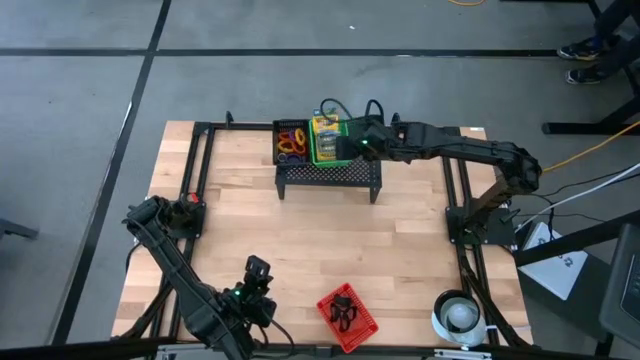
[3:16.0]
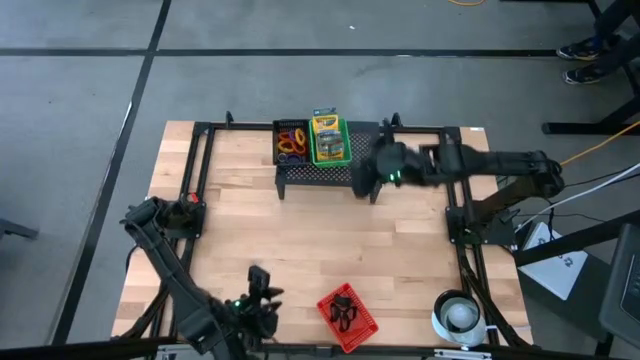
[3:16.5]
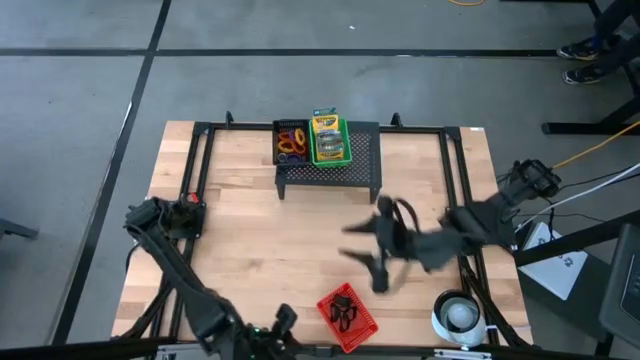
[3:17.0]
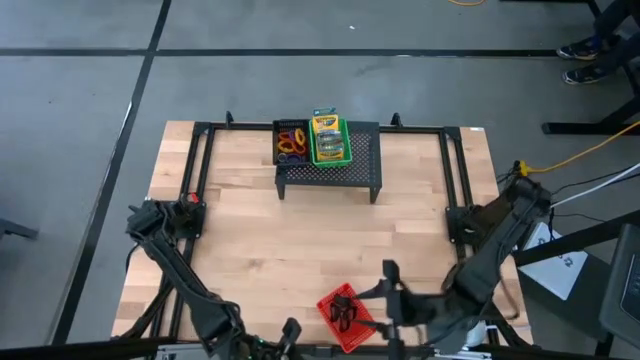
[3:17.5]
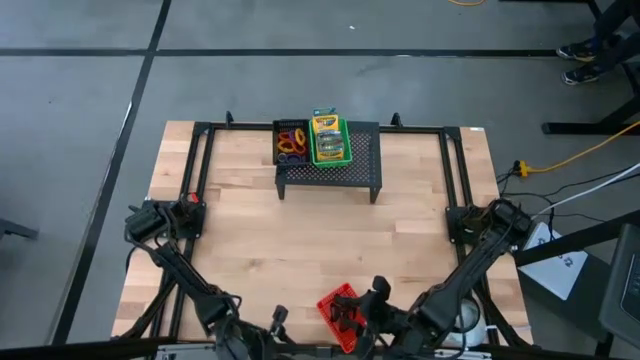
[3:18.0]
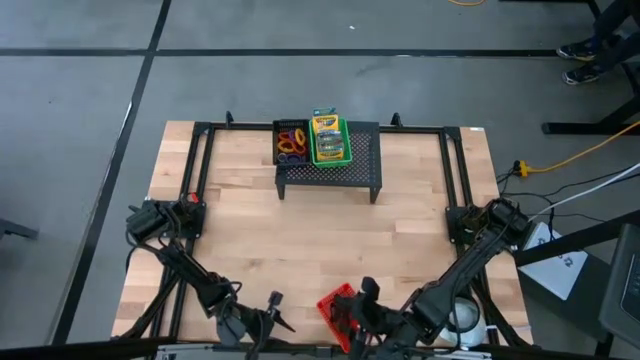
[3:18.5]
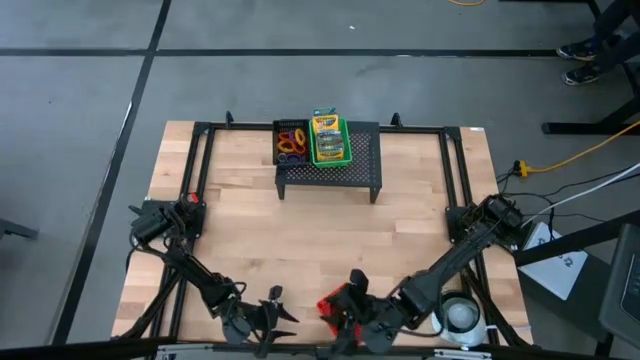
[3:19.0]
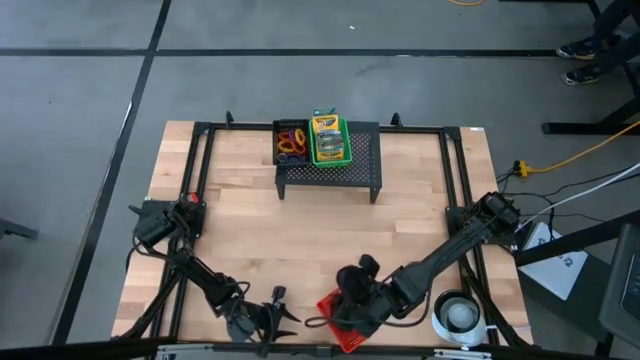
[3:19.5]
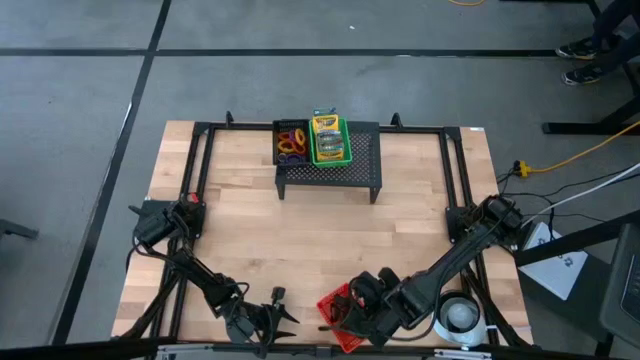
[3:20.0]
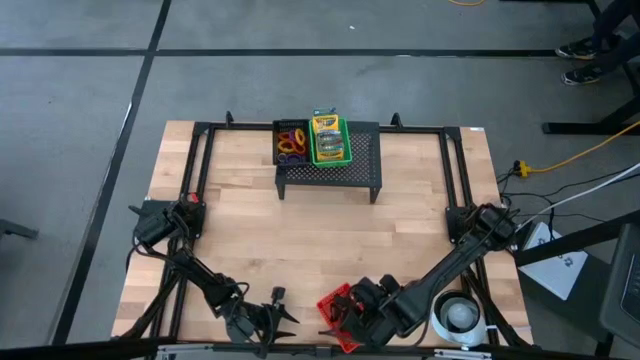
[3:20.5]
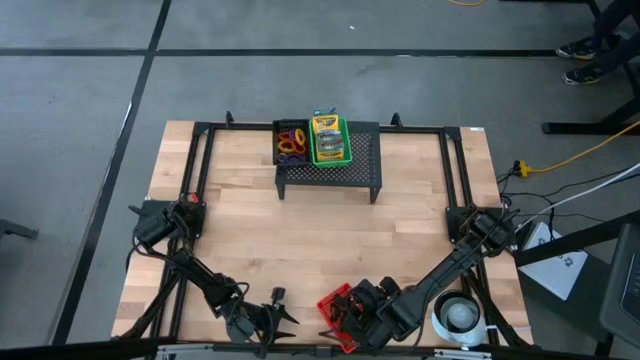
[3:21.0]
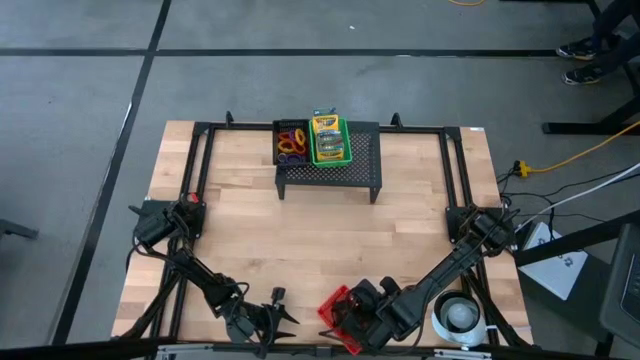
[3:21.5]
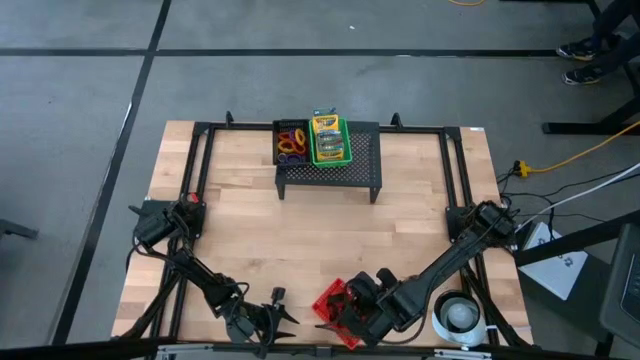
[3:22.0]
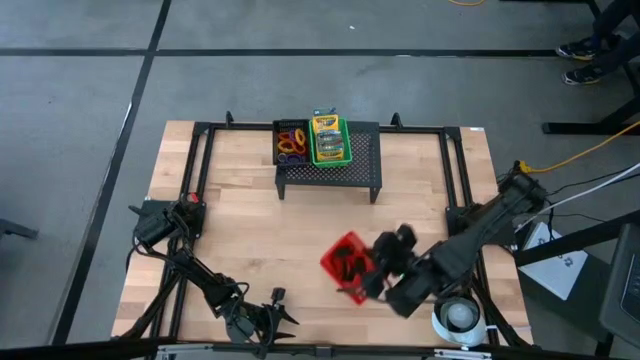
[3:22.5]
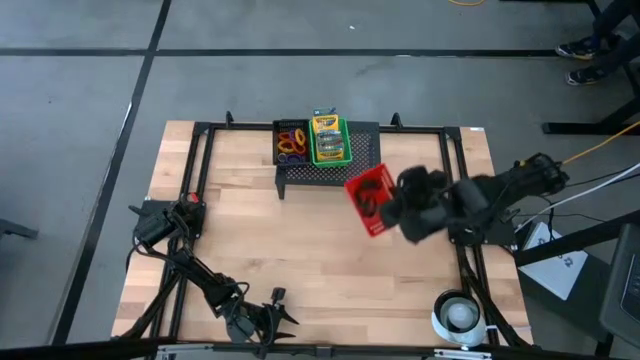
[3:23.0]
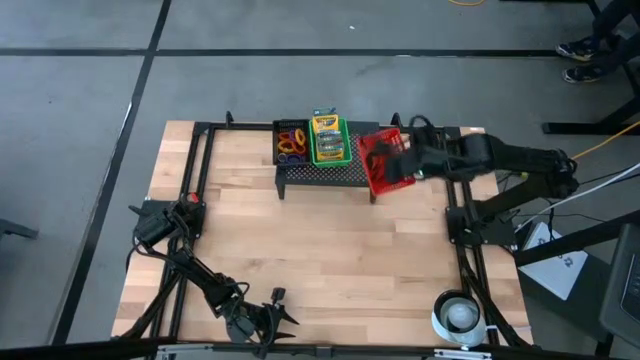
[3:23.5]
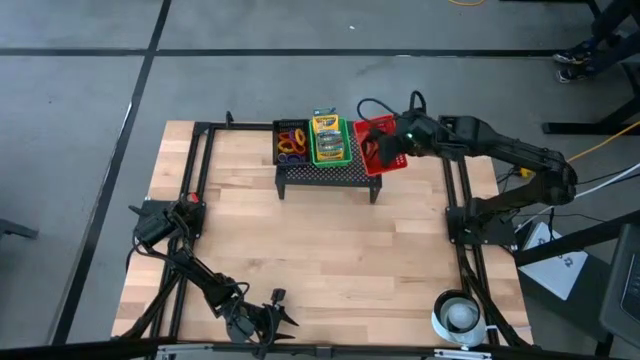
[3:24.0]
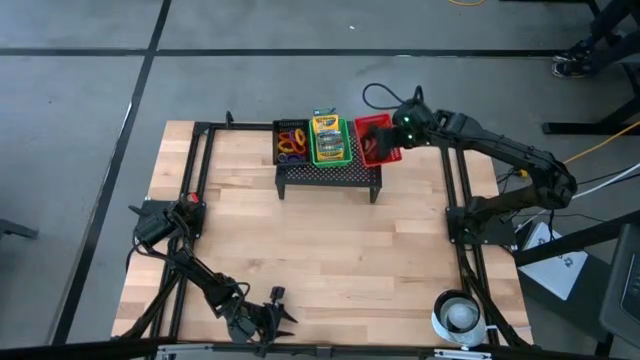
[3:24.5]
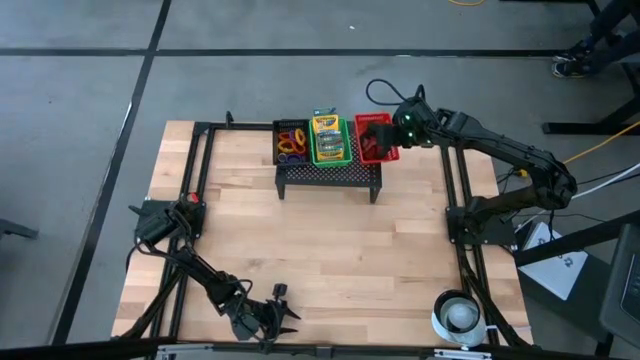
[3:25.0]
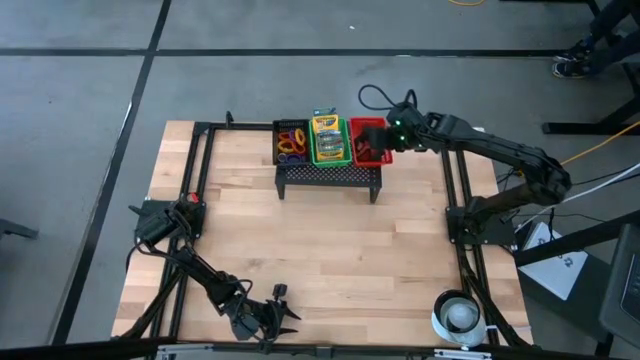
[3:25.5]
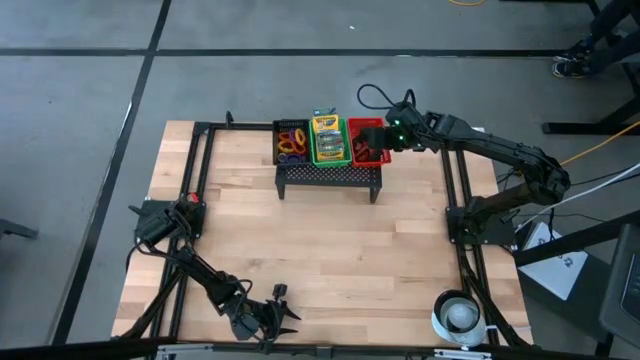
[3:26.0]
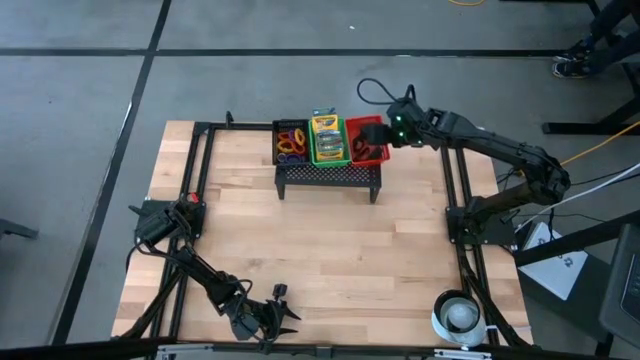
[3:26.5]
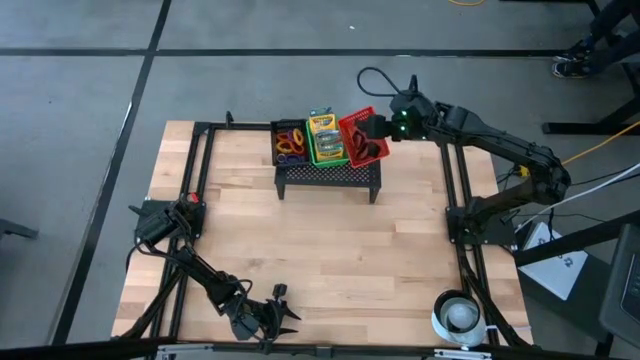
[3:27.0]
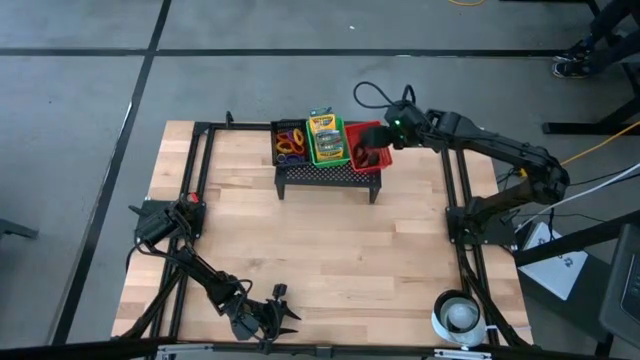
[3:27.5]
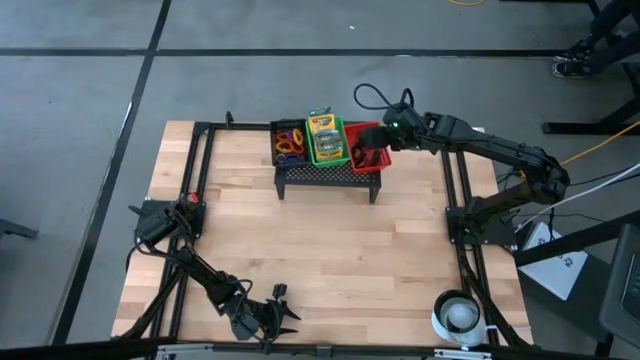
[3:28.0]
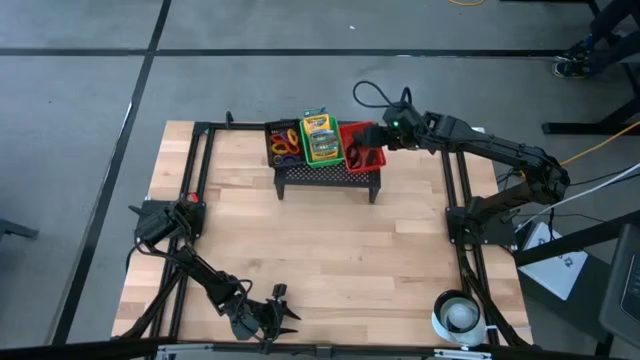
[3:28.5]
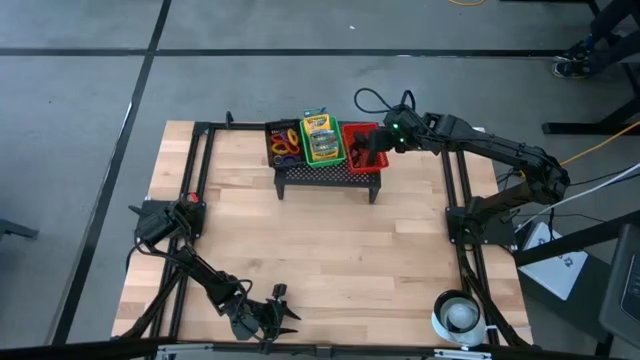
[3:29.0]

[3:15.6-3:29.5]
Task: Pick & Place Office Desk Supplies
Put the red bin on the shelf

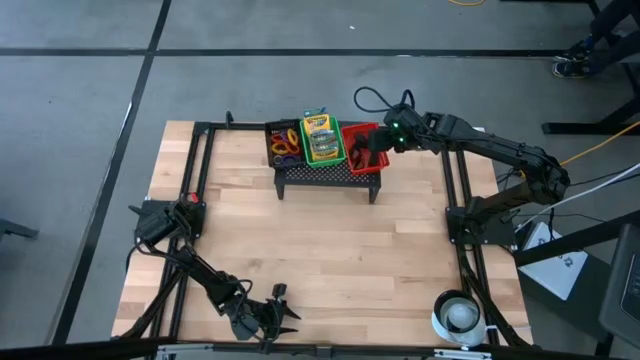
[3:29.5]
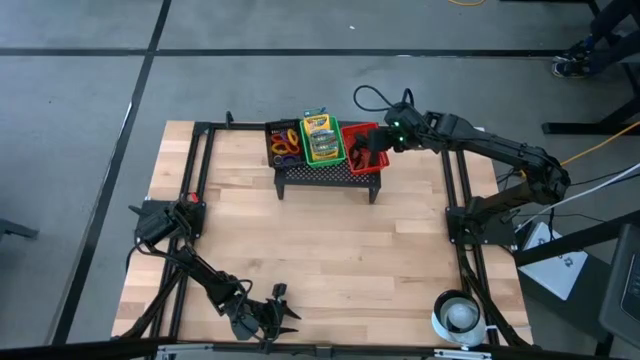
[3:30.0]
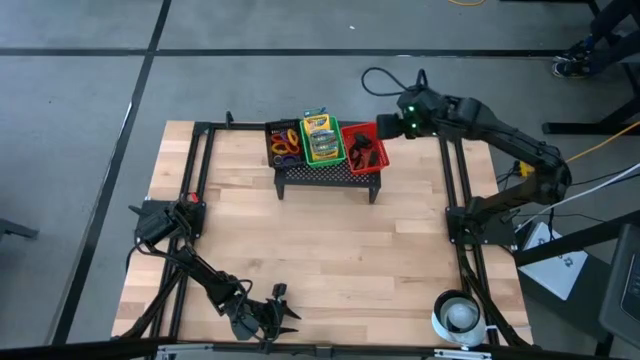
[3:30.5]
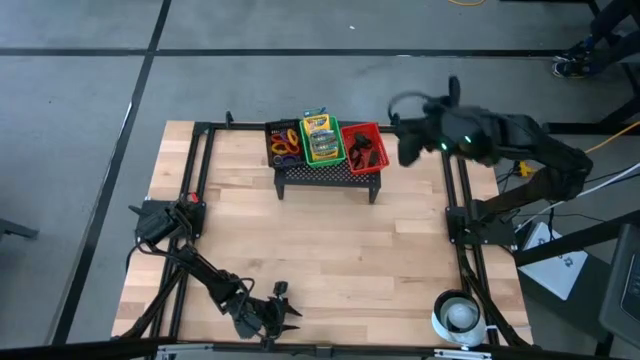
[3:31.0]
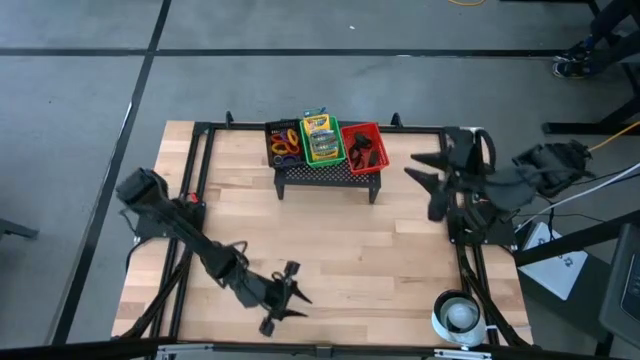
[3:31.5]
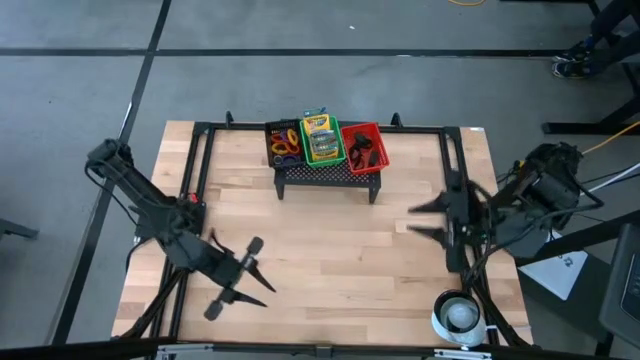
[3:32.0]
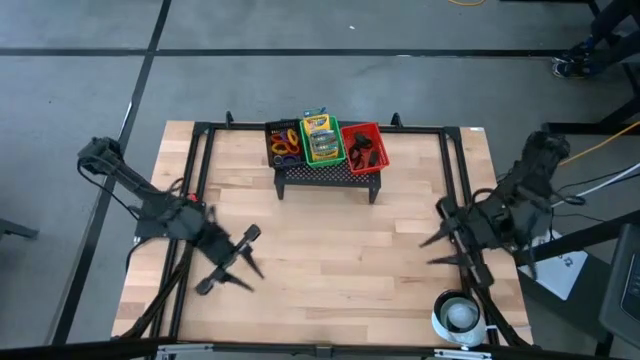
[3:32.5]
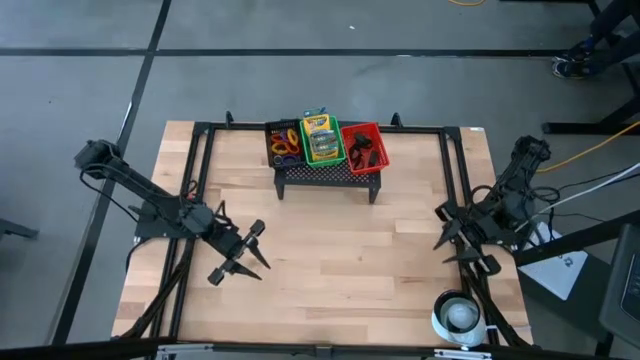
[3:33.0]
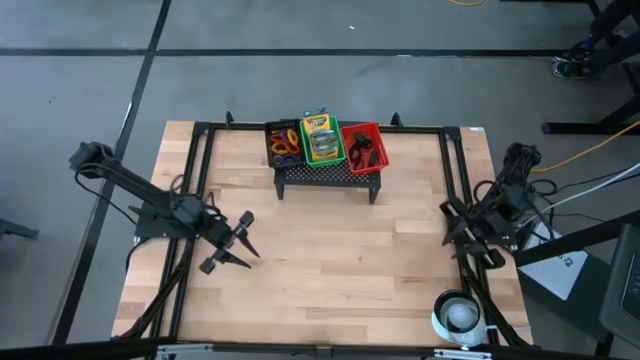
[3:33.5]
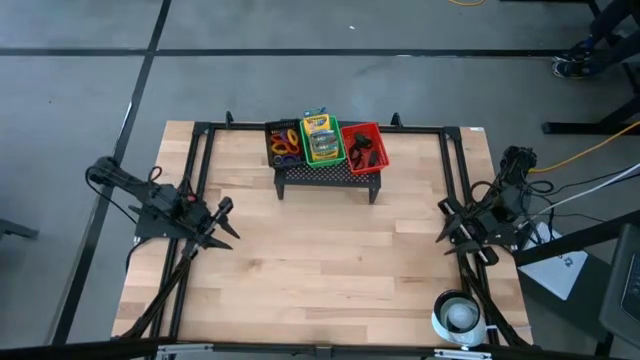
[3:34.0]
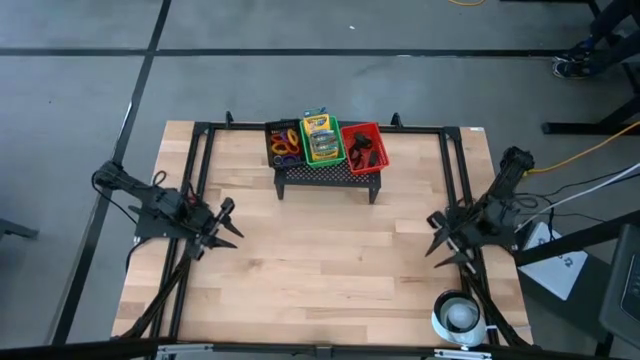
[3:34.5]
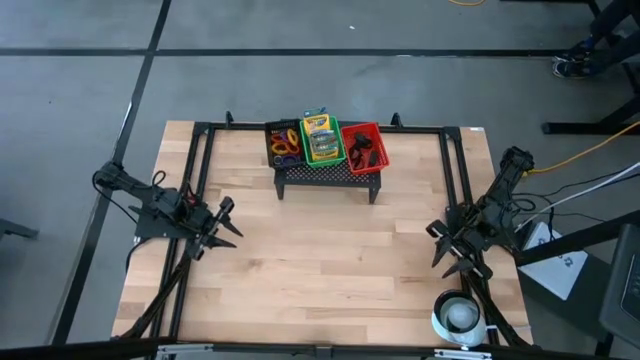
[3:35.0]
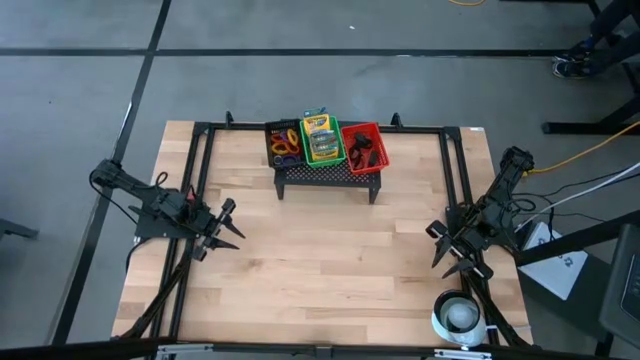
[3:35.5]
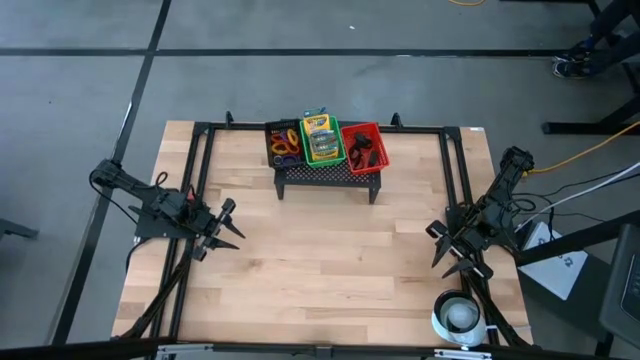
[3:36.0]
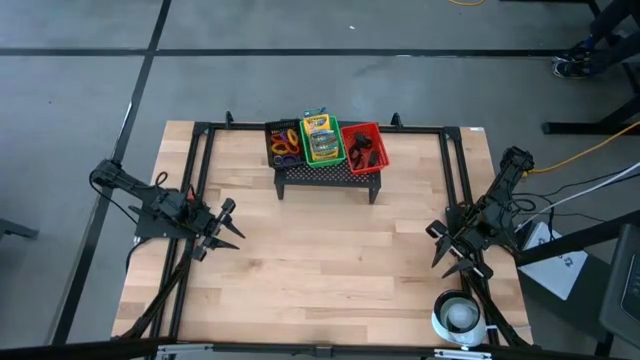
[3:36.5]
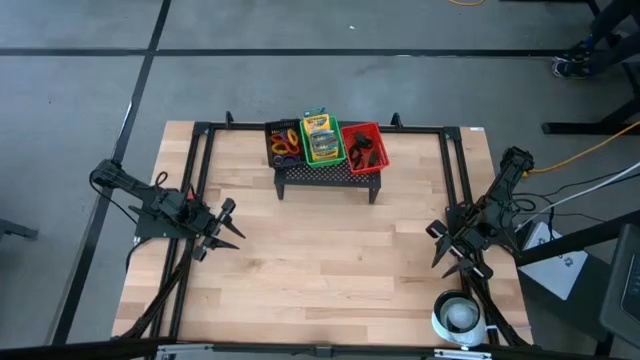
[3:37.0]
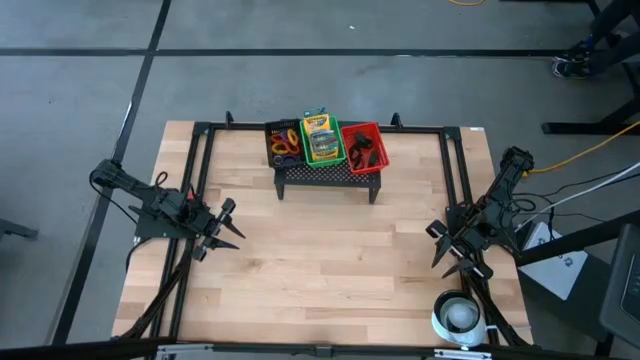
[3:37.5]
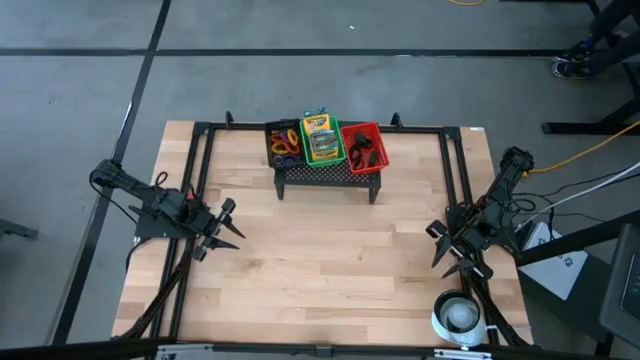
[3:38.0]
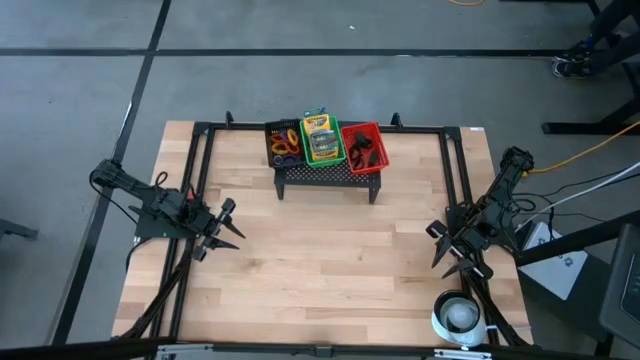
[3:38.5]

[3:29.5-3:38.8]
Return to Home Position
